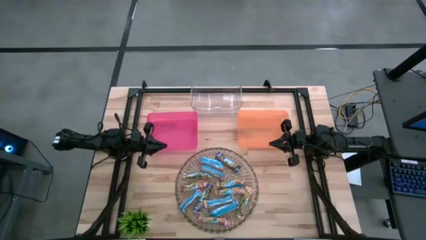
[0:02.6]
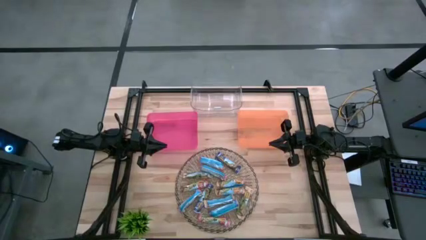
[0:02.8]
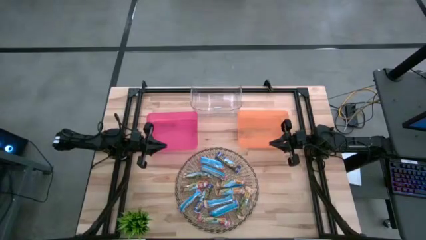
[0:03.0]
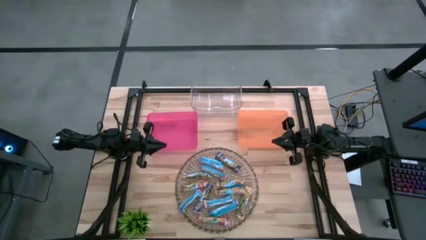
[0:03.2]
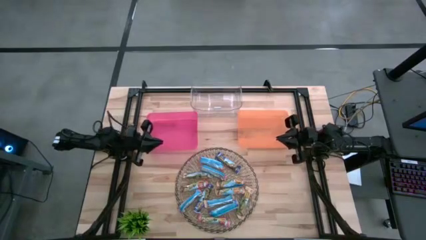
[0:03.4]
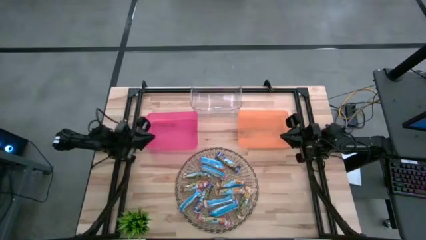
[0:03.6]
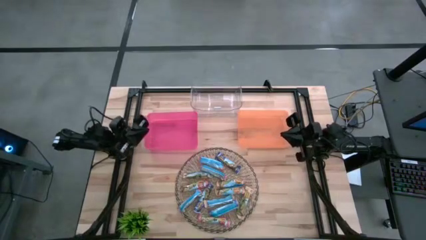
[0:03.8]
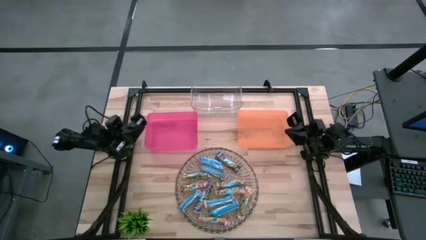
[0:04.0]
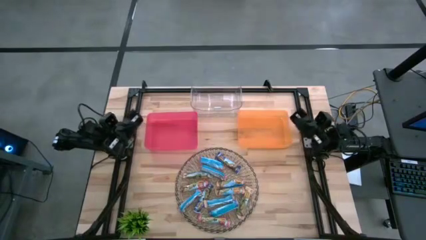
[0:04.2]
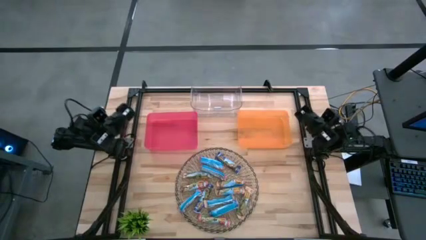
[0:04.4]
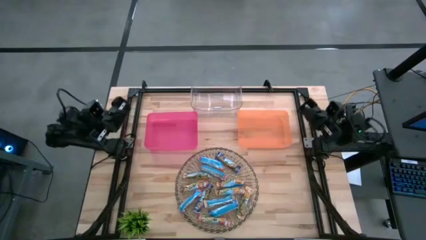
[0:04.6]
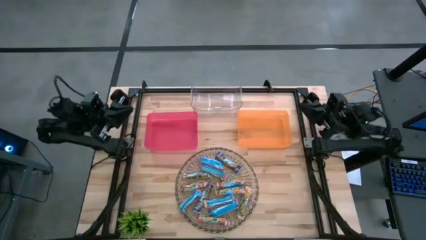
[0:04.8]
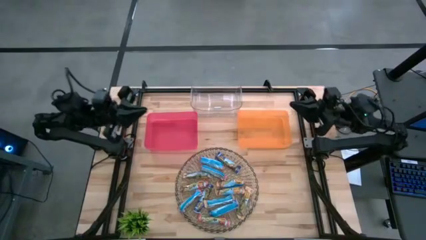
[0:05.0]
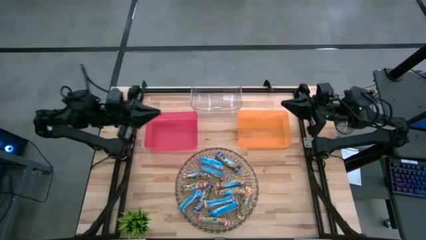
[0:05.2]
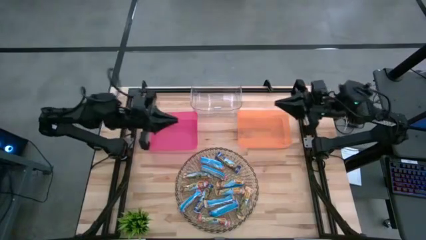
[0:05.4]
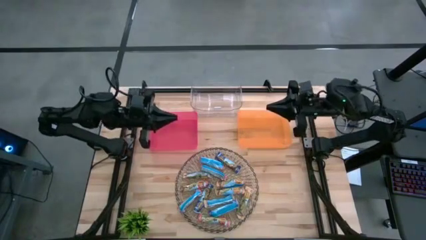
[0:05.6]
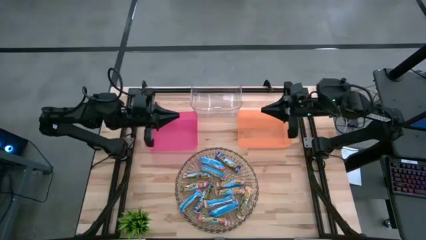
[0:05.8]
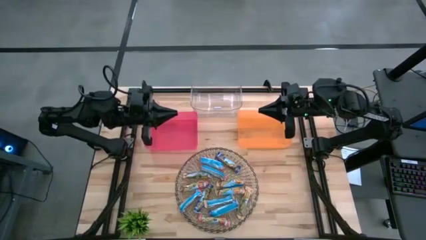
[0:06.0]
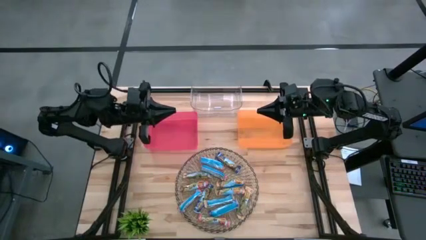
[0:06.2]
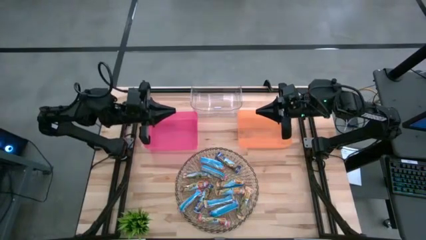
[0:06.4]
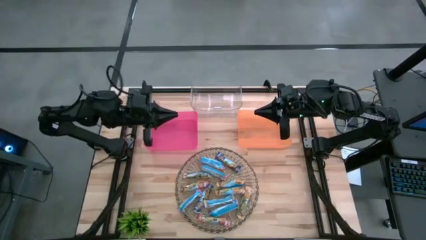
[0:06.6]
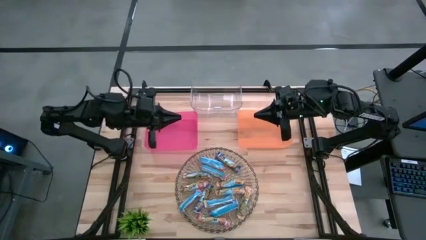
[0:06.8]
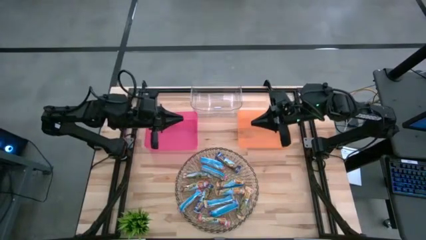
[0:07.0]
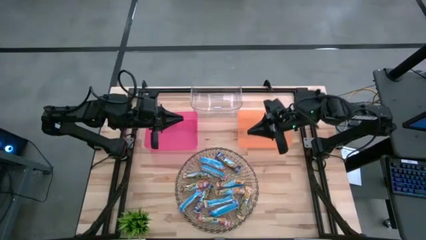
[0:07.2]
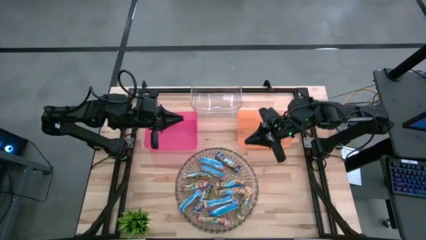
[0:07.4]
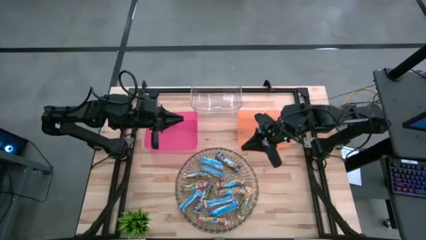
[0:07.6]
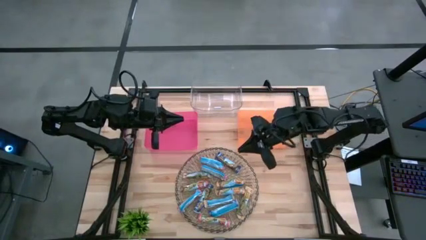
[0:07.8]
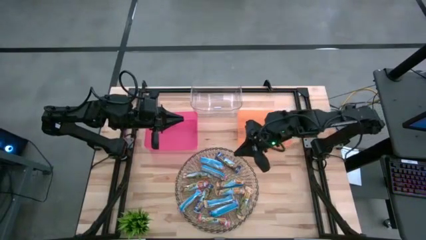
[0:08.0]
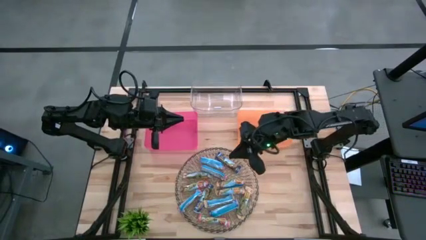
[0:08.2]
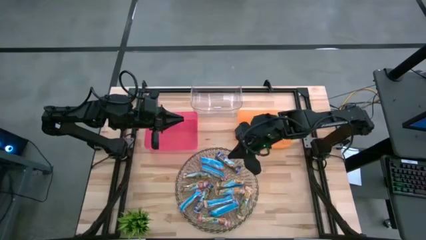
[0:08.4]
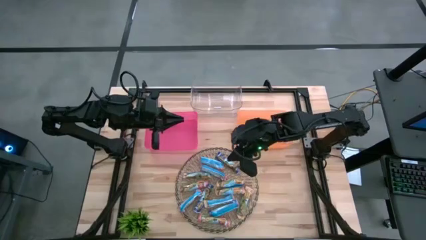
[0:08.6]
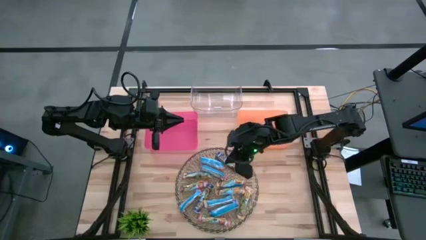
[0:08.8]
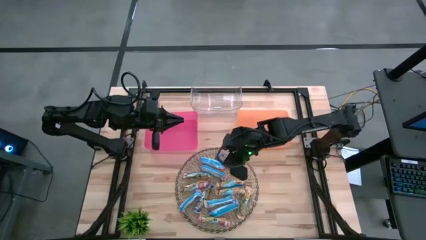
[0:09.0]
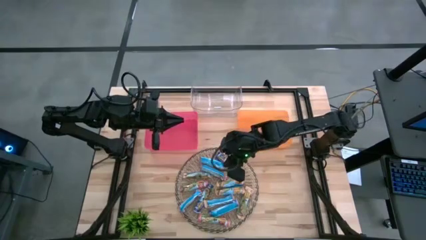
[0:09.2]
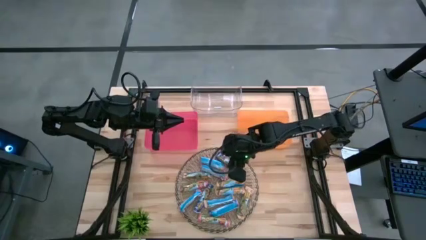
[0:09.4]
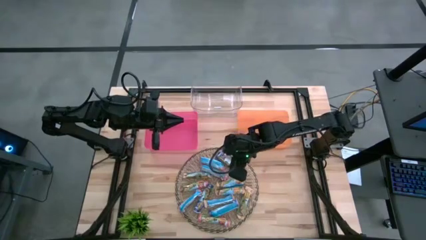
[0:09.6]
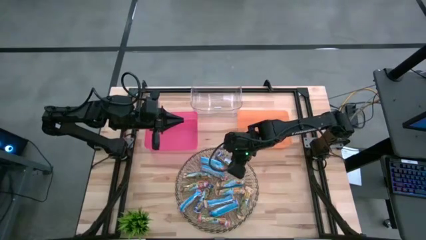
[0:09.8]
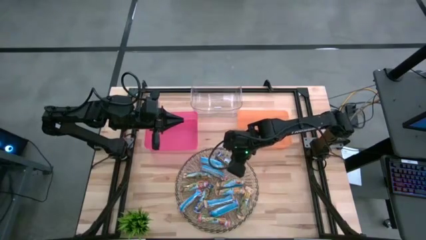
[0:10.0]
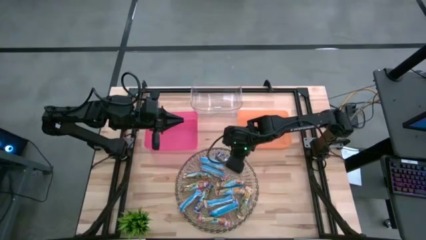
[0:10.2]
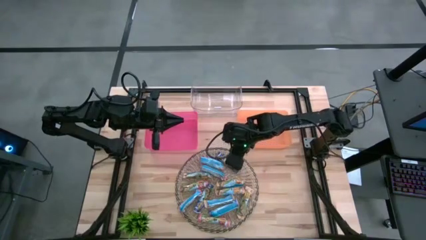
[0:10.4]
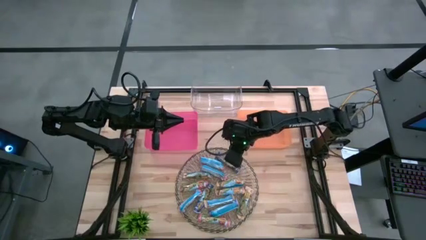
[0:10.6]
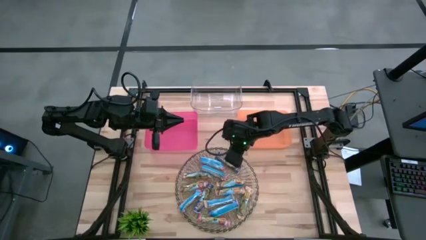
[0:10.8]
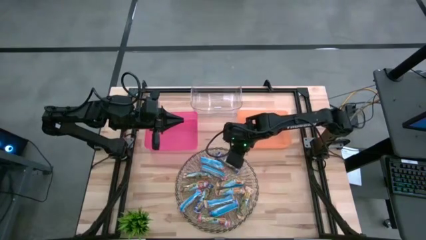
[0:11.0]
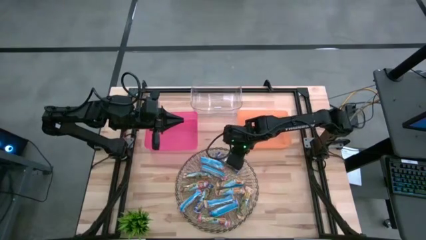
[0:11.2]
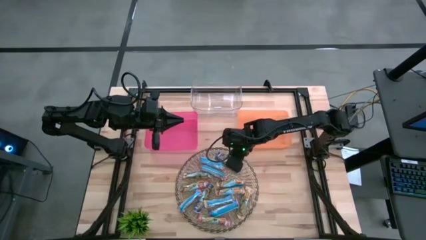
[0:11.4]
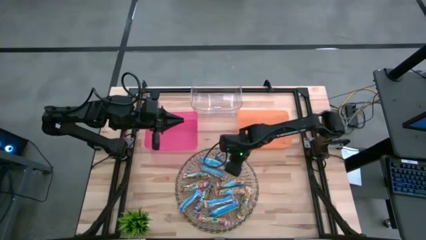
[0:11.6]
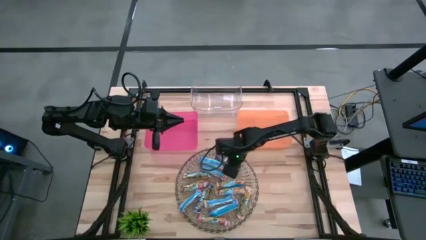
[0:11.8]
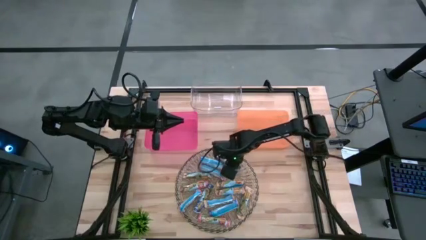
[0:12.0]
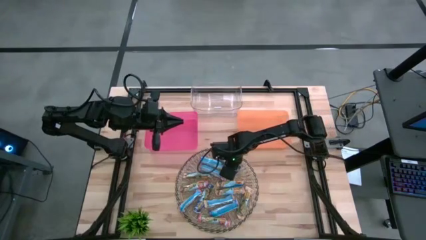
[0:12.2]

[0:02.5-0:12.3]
Task: Pick and place Granola Bars by type
Put the blue granola bar into the transparent bin

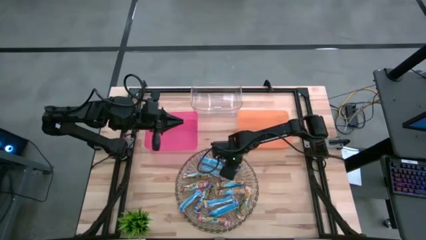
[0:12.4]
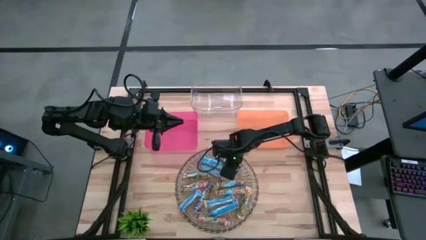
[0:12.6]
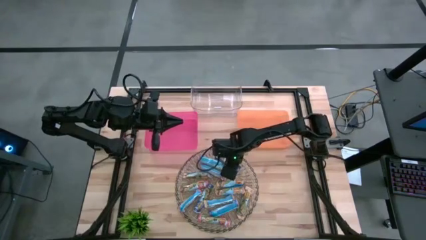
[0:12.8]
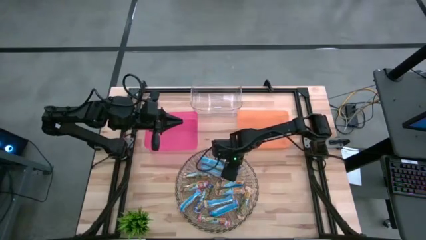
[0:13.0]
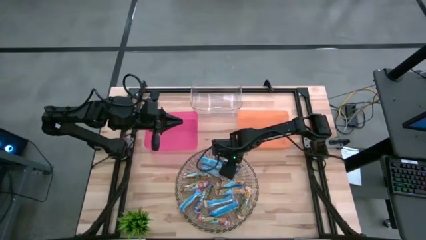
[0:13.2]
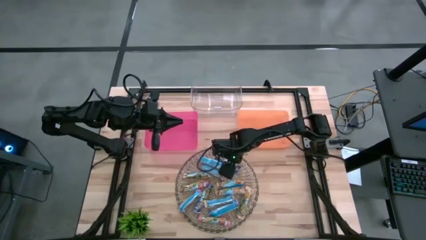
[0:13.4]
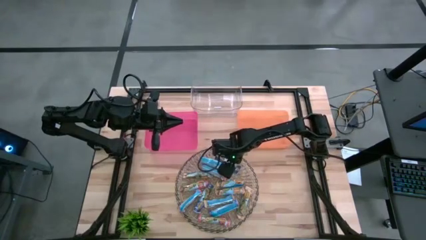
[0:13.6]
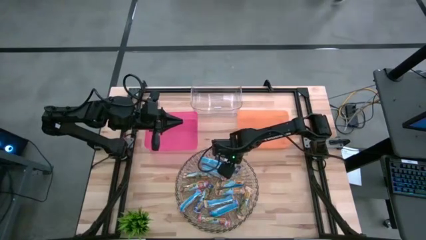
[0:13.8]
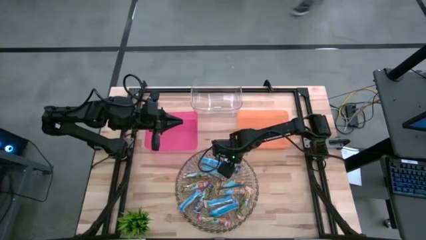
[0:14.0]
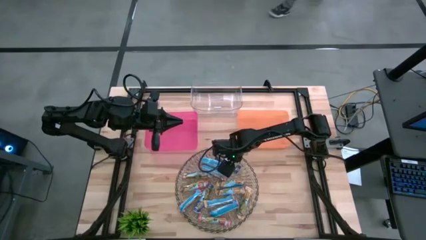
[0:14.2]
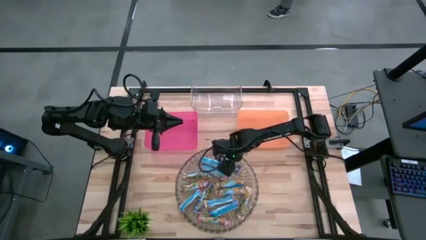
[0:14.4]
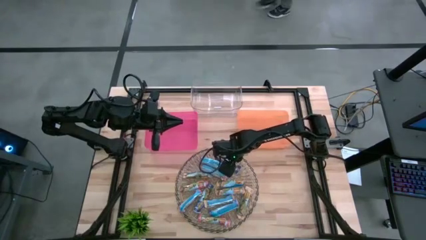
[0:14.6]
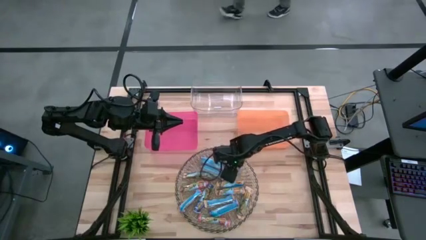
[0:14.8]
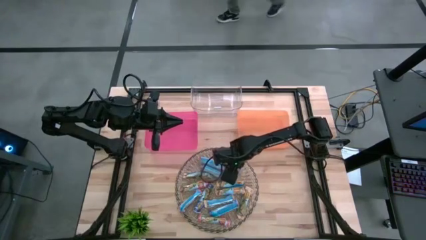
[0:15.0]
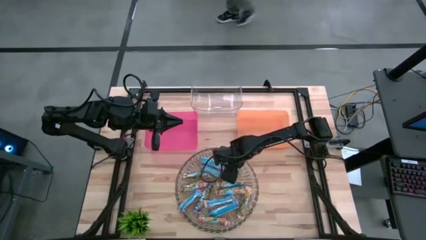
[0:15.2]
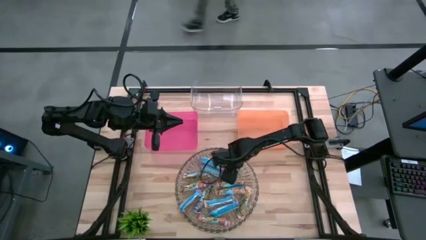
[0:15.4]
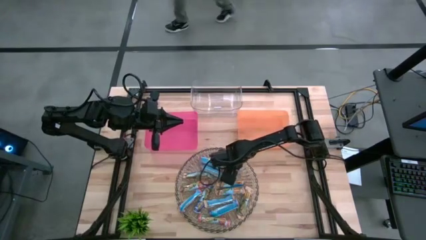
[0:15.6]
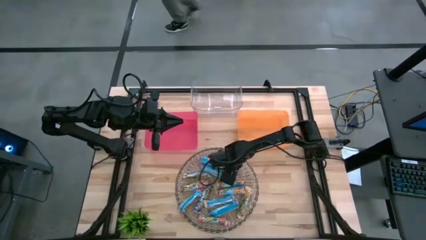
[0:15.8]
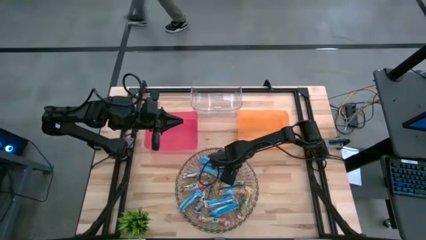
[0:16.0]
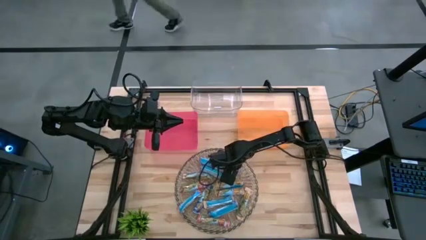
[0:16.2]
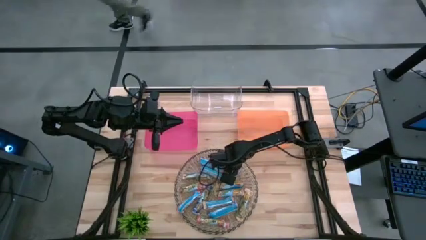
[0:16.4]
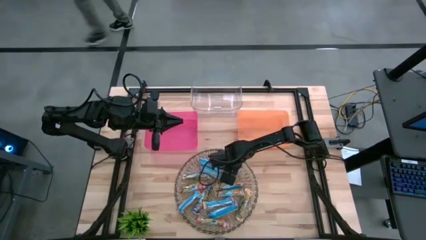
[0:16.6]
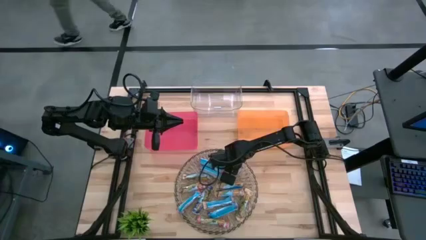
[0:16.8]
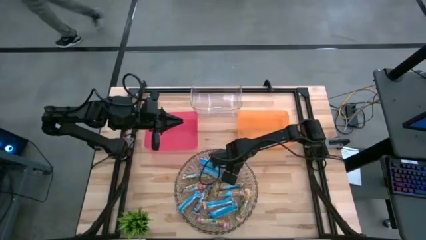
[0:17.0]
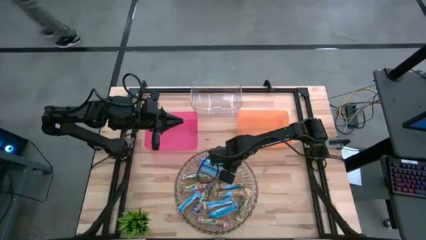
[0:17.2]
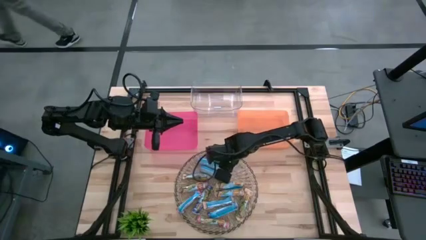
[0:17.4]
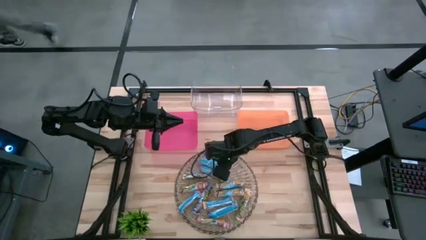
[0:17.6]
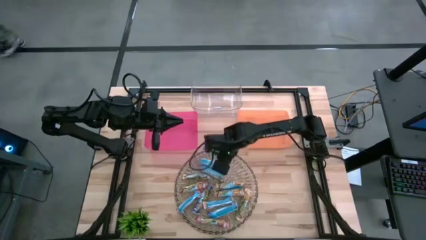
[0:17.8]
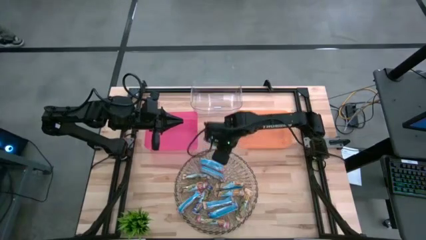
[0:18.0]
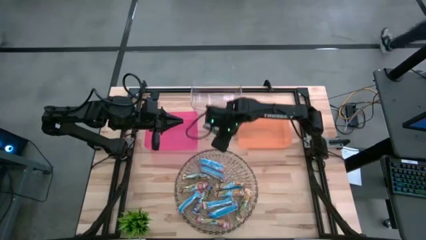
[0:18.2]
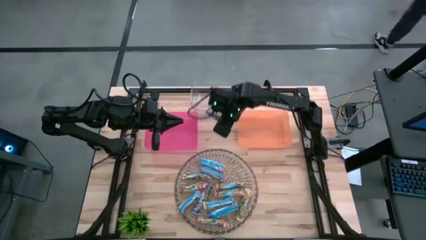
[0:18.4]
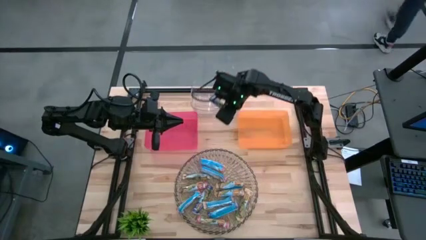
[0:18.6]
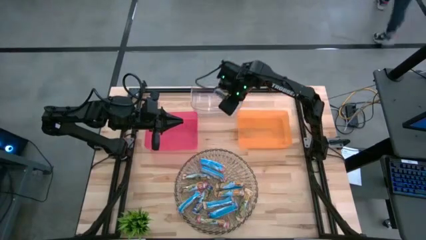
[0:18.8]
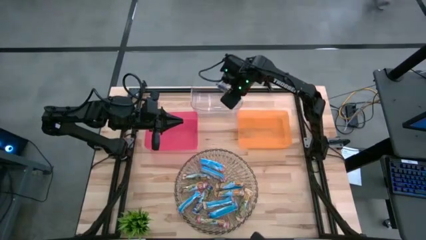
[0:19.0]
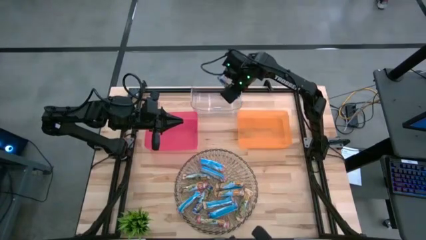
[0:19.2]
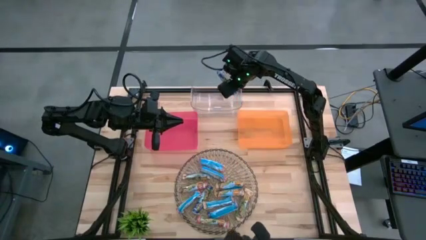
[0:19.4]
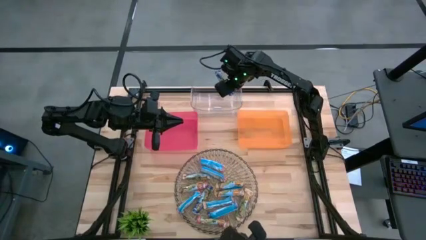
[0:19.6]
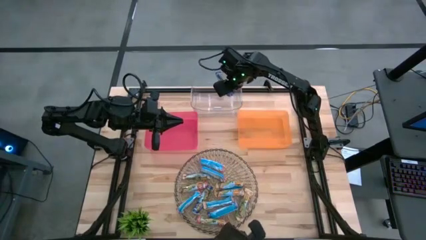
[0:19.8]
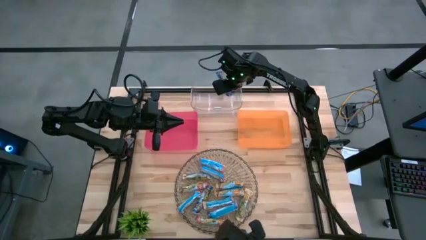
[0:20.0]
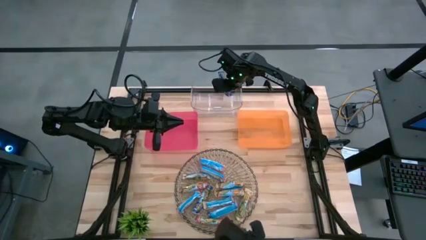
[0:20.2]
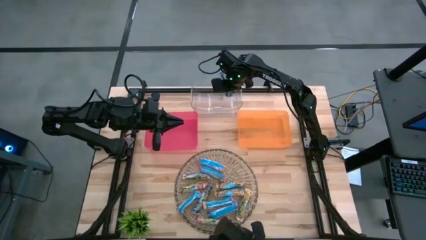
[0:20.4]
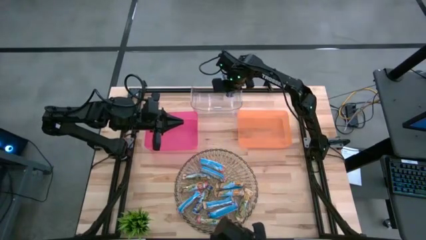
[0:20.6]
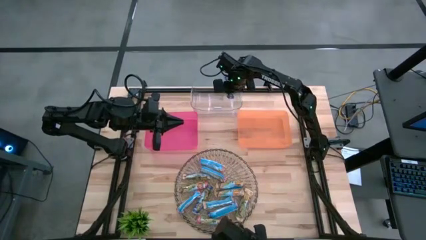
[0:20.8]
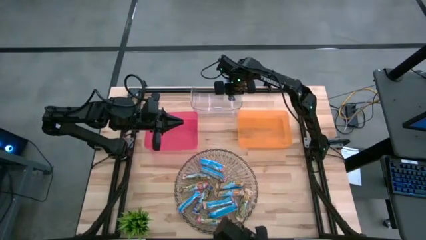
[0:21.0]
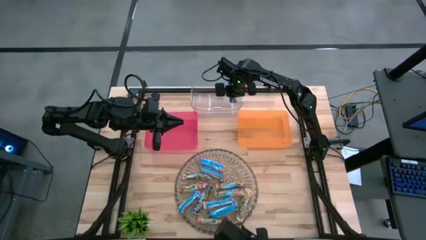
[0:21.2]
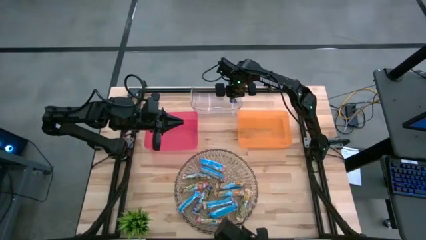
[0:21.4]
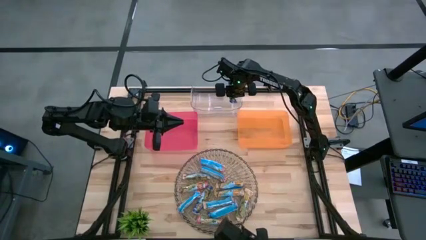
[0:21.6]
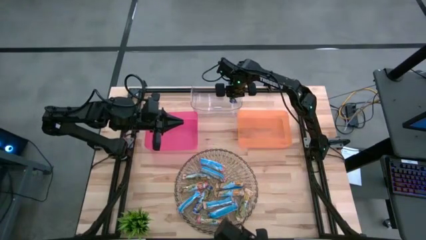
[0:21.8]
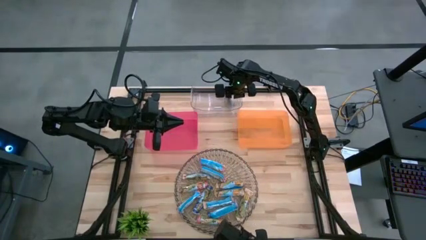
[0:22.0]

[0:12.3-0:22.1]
Put the blue granola bar into the transparent bin
